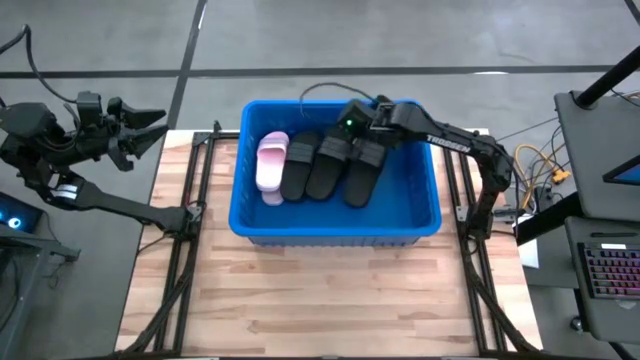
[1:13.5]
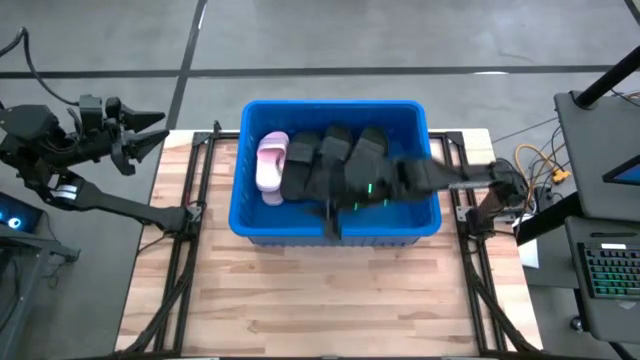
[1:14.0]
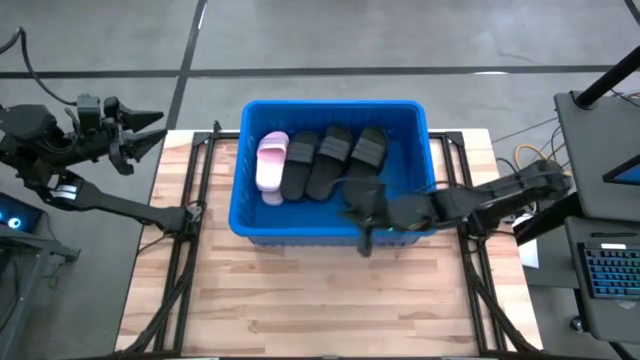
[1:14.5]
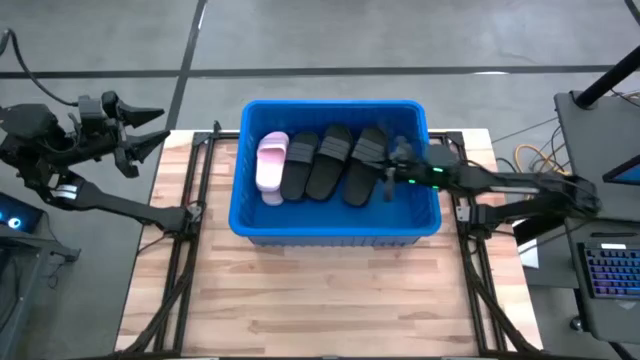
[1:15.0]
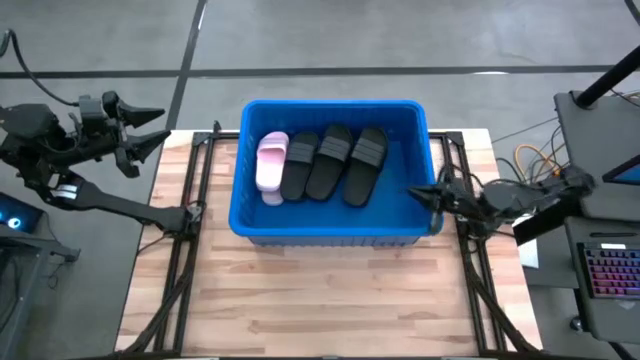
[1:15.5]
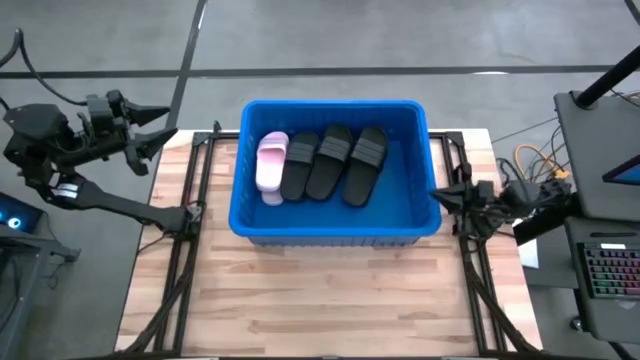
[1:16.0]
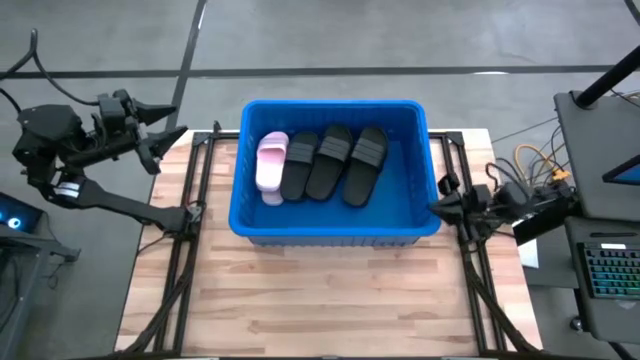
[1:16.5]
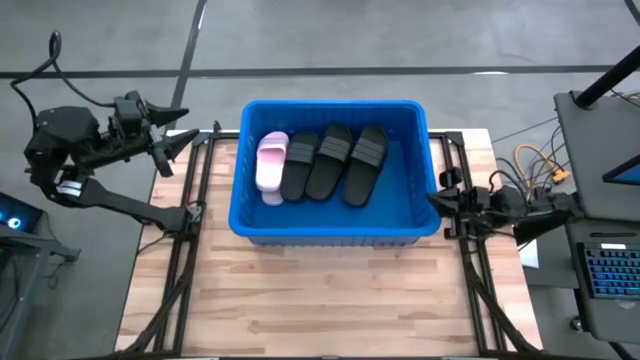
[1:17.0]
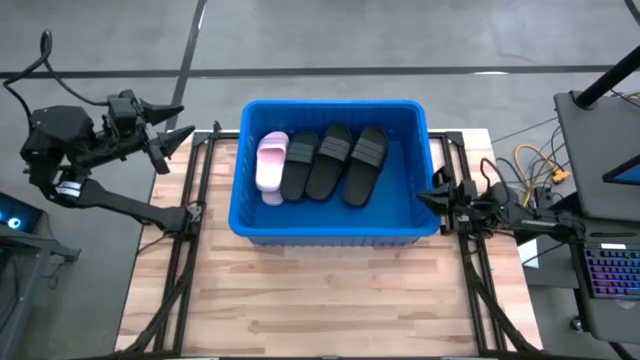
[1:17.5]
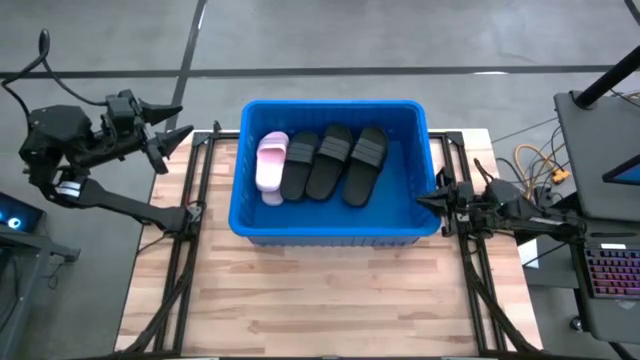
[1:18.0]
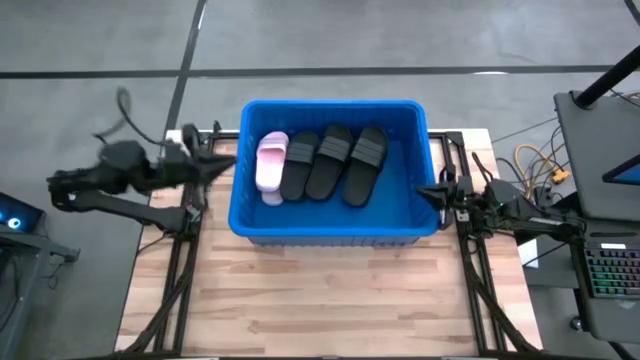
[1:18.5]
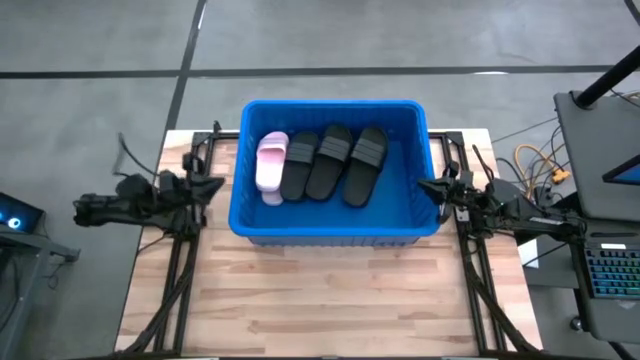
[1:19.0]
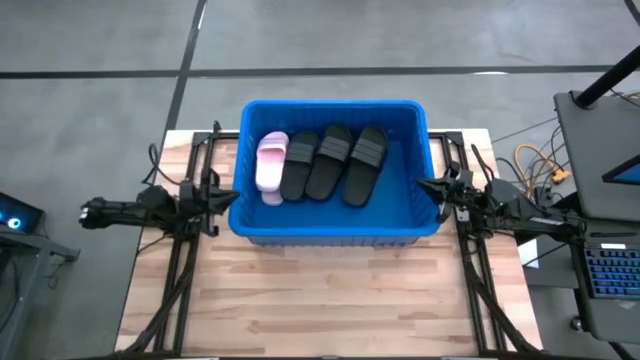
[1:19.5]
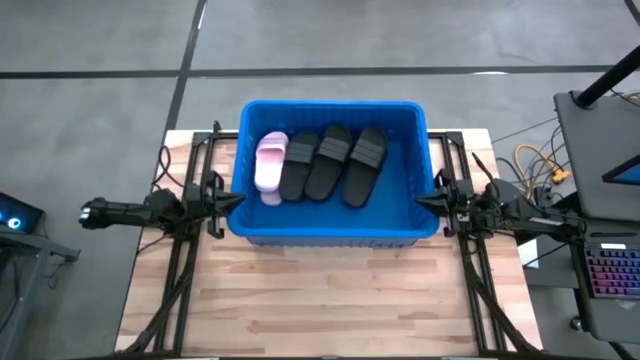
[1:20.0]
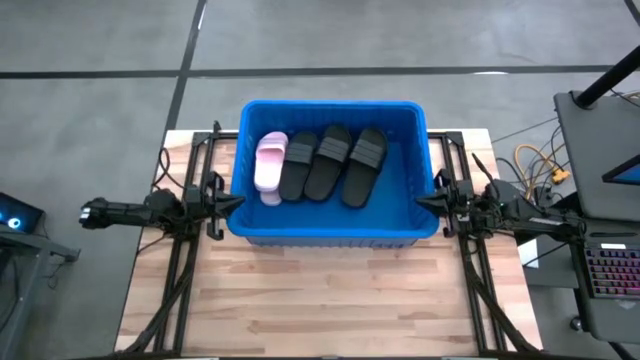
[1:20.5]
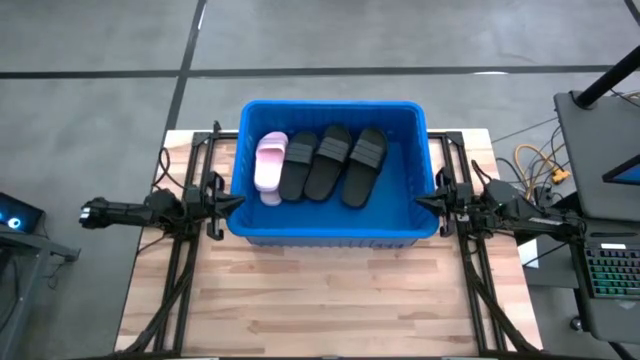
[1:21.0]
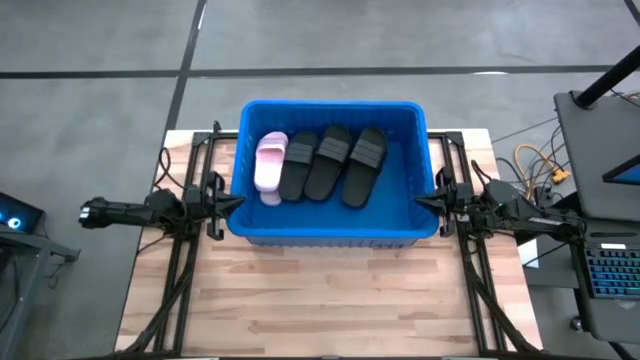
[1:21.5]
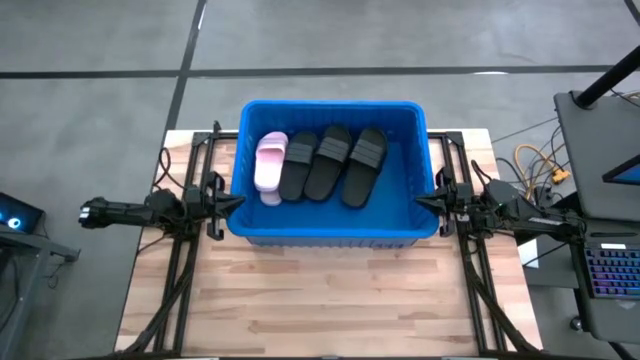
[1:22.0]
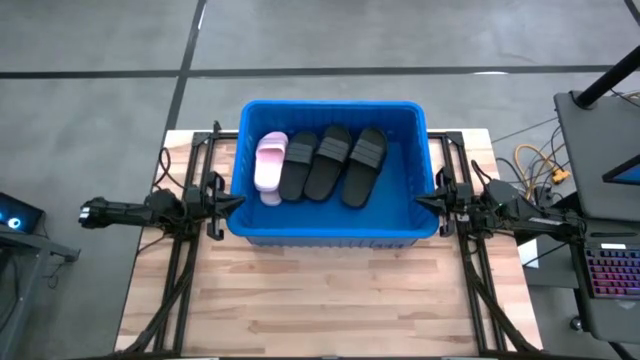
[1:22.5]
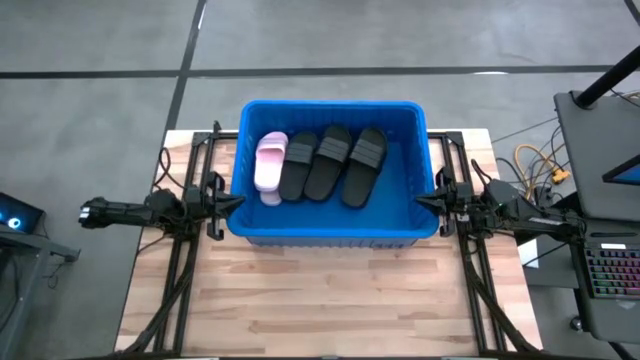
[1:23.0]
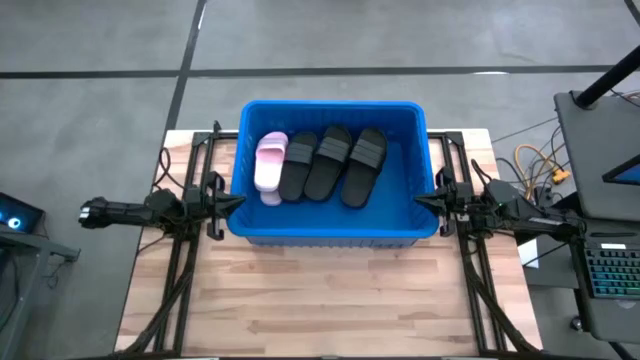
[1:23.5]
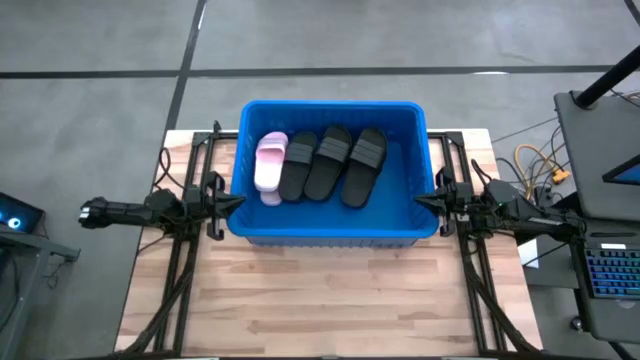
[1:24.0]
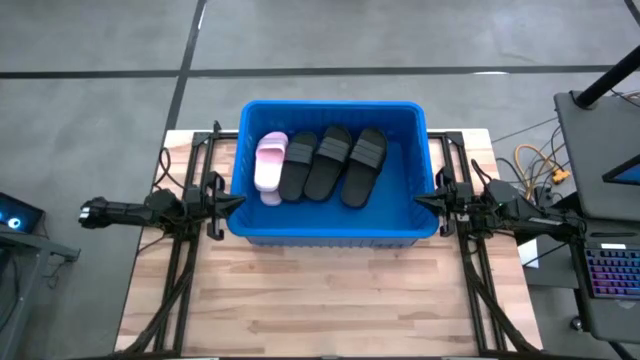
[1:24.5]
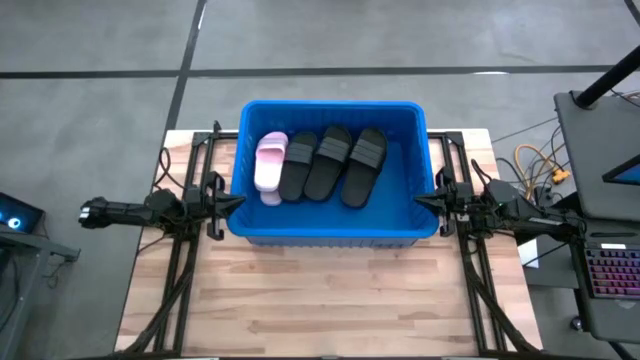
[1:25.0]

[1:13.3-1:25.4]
Task: Pick and place slides into bin
Return to Home Position

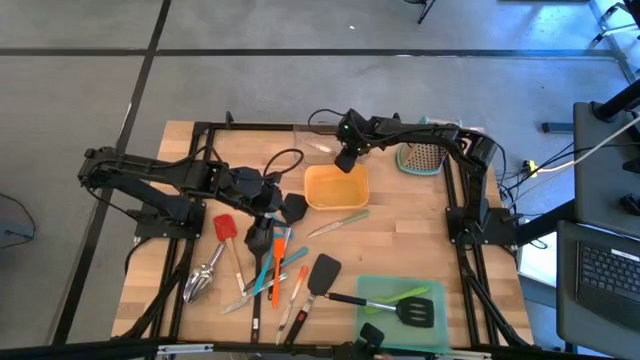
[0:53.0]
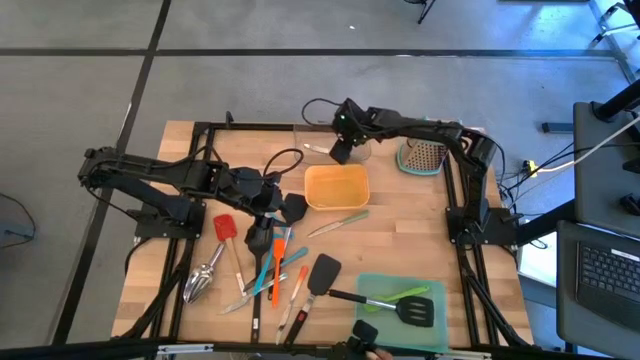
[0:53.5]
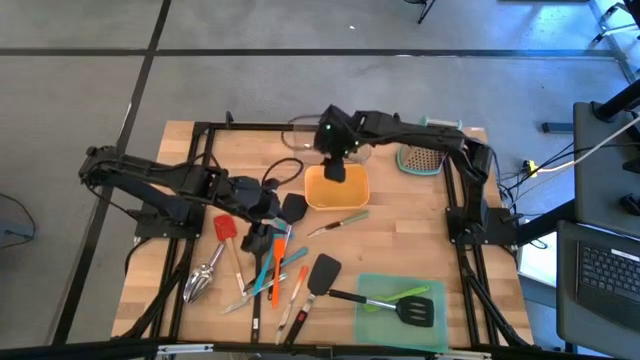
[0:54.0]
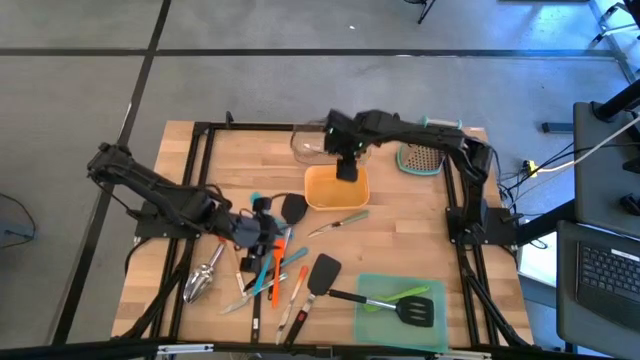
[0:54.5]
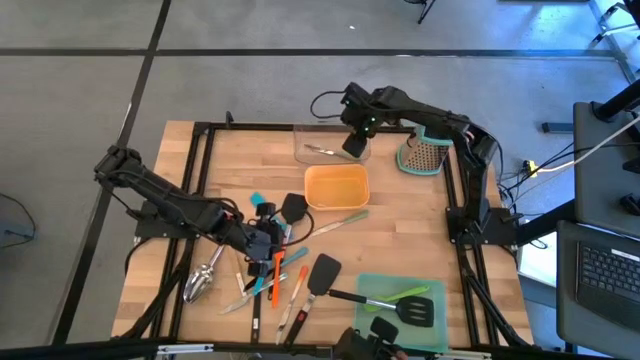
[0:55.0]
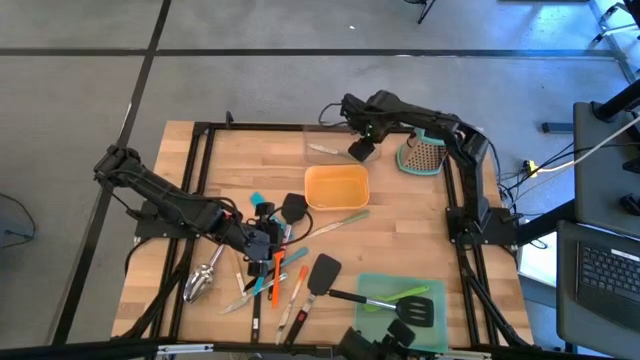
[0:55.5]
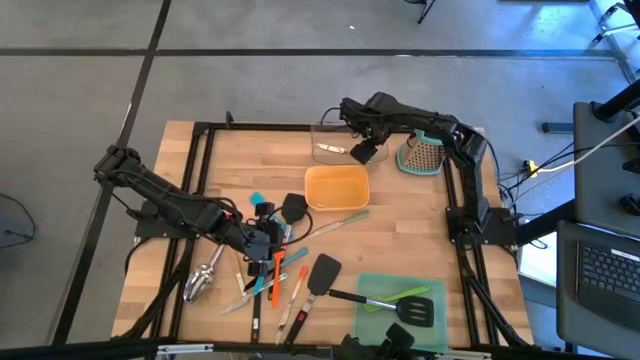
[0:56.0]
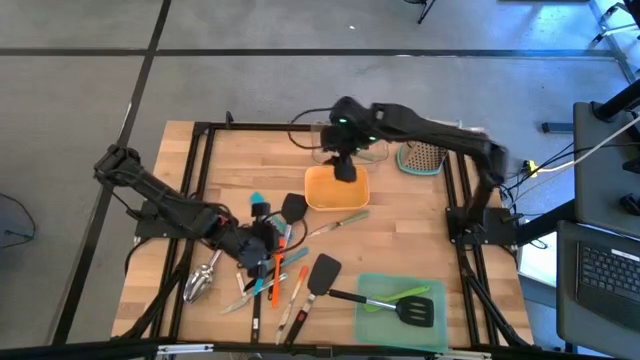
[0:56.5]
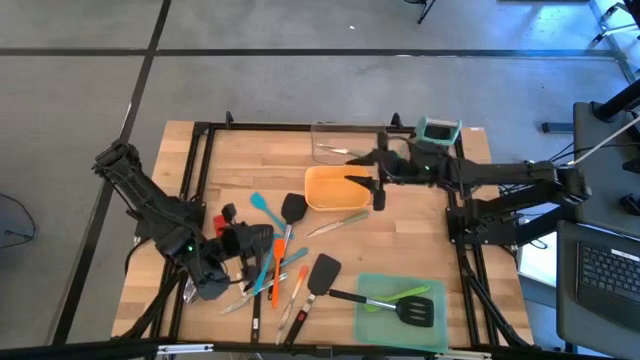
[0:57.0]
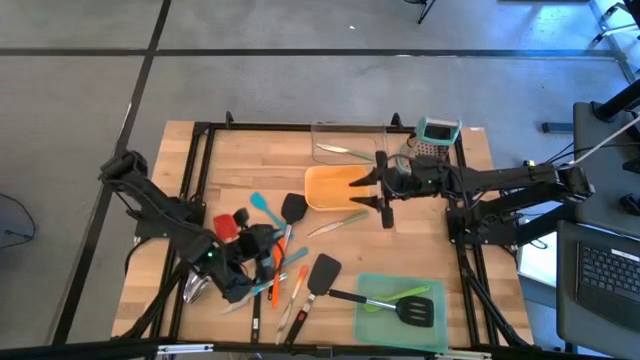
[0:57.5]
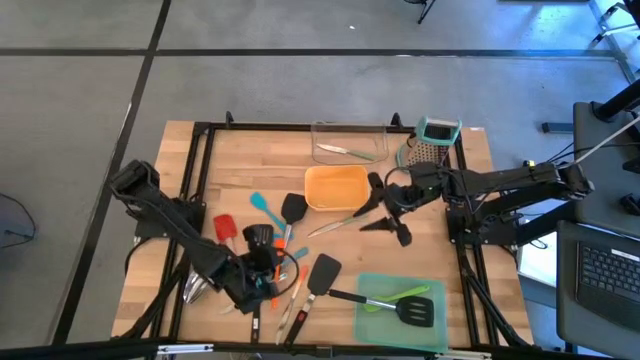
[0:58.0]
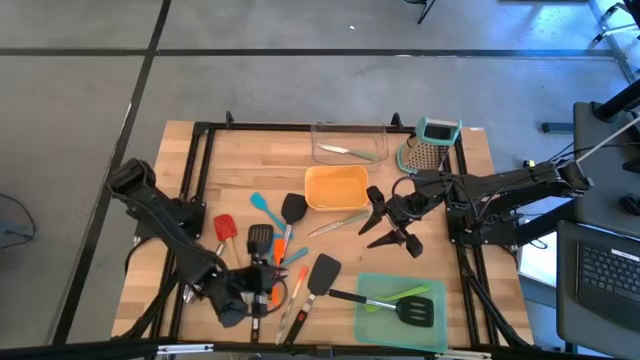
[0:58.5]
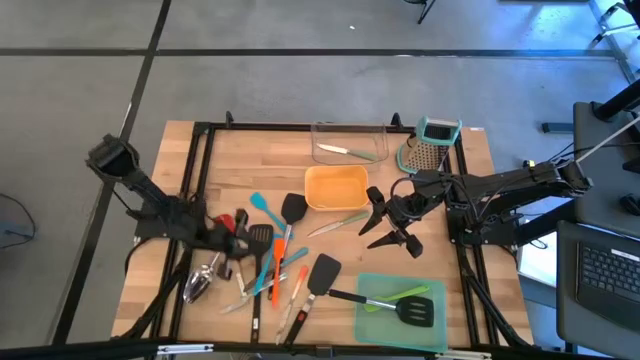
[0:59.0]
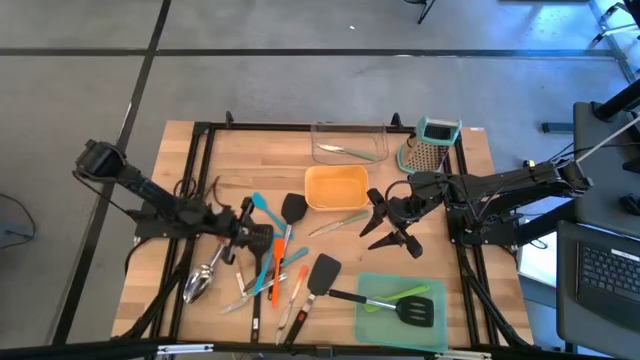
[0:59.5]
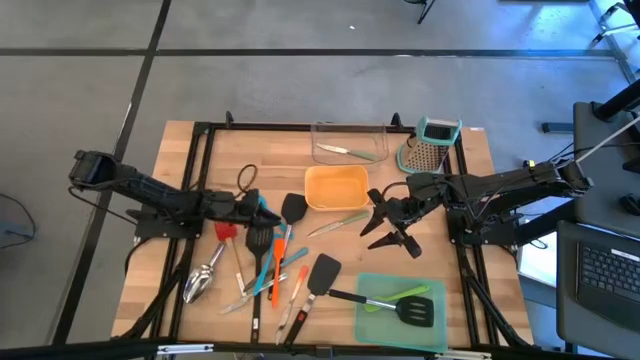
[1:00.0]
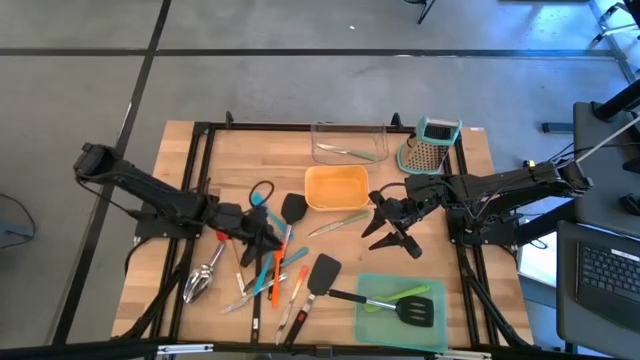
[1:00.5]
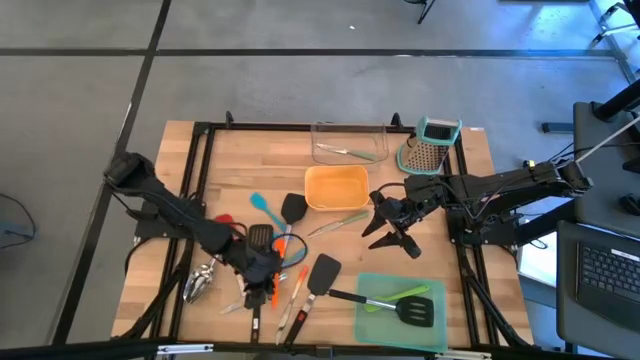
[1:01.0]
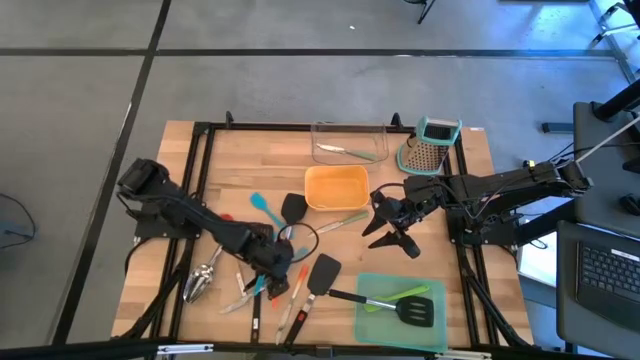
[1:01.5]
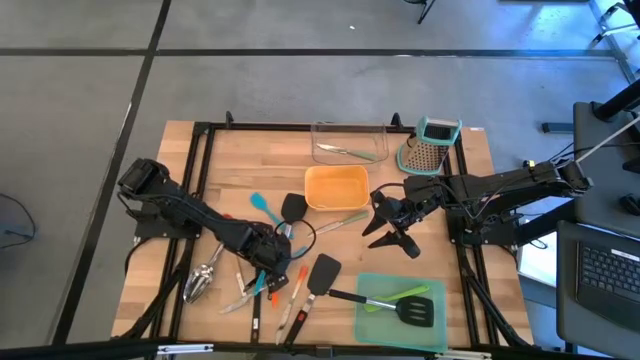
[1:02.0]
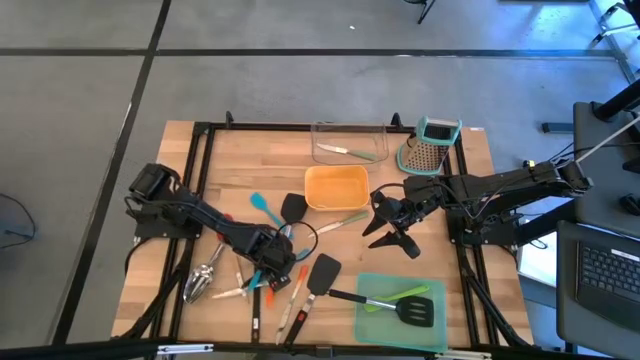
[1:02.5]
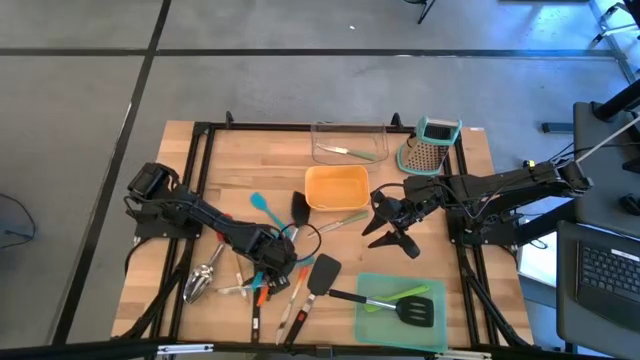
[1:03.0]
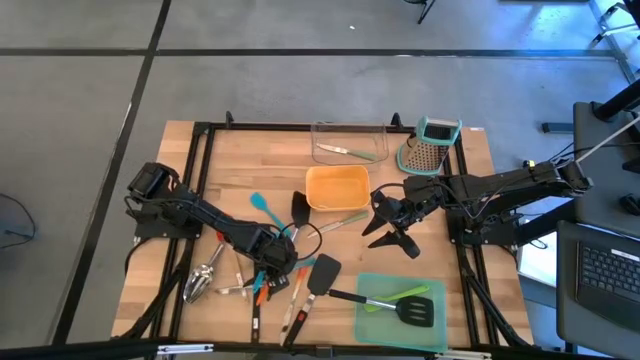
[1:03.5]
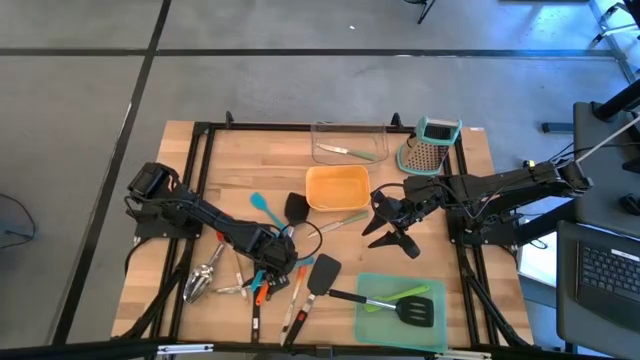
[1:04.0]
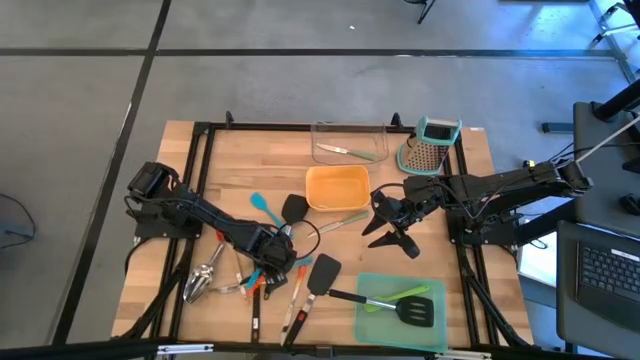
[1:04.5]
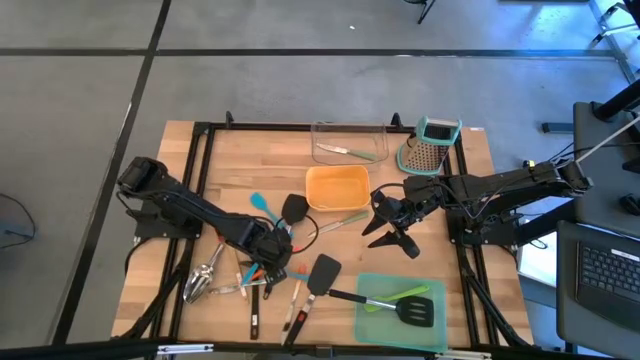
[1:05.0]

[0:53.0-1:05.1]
Task: Pick & Place Kitchen Items
Put the orange silicone spatula into the green bin
